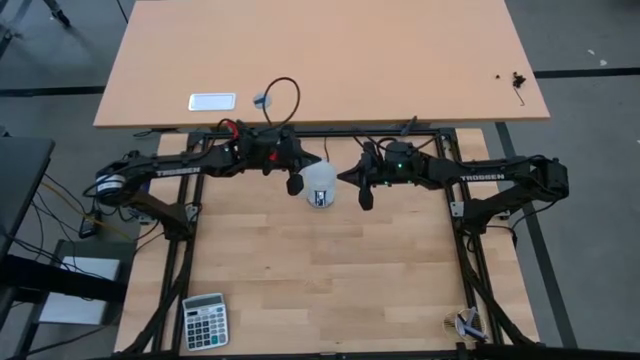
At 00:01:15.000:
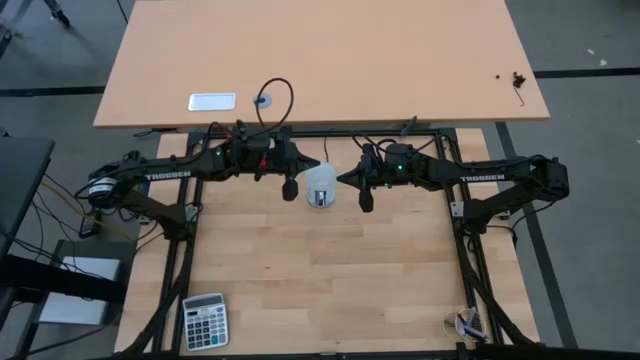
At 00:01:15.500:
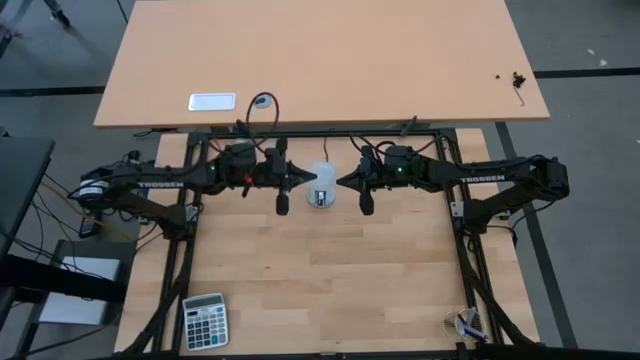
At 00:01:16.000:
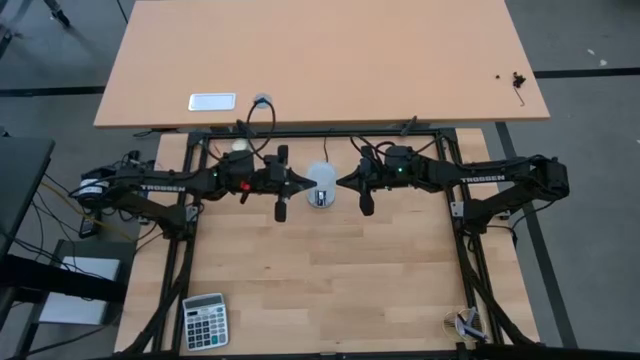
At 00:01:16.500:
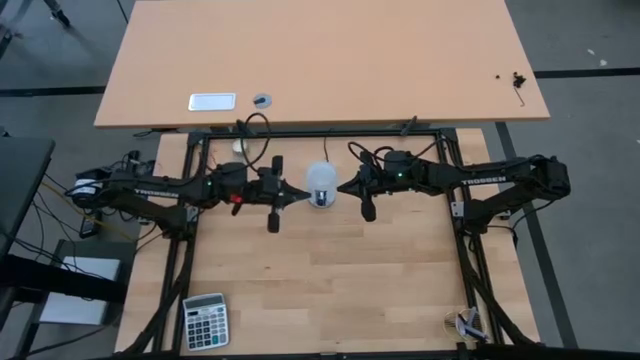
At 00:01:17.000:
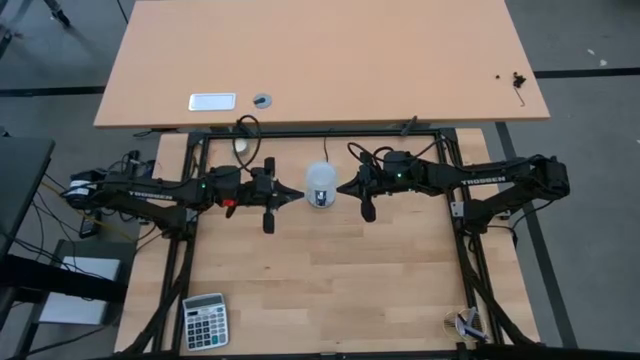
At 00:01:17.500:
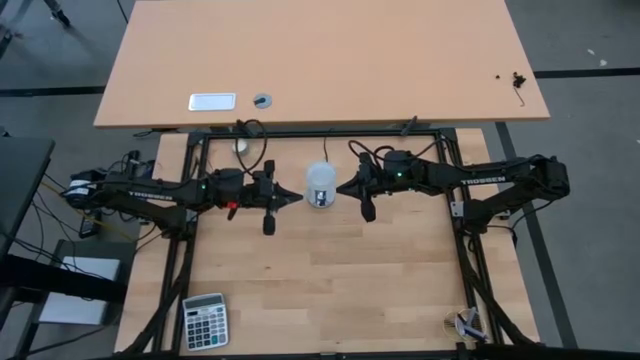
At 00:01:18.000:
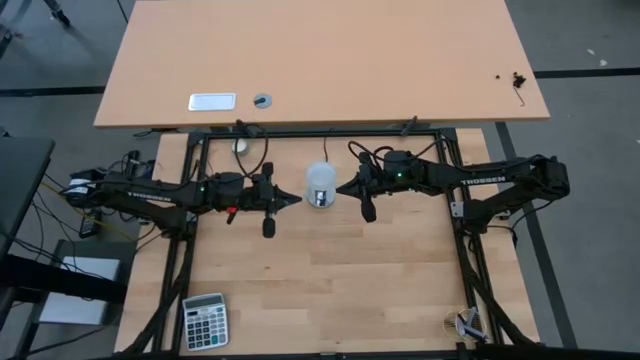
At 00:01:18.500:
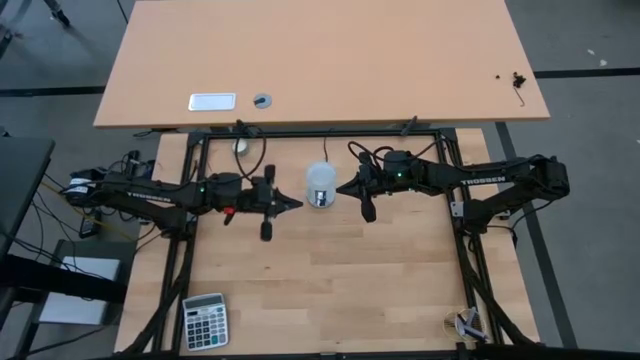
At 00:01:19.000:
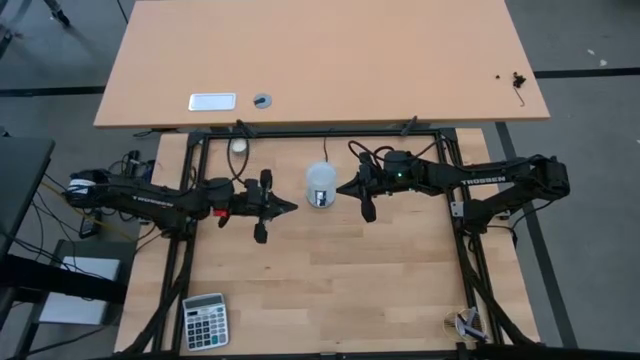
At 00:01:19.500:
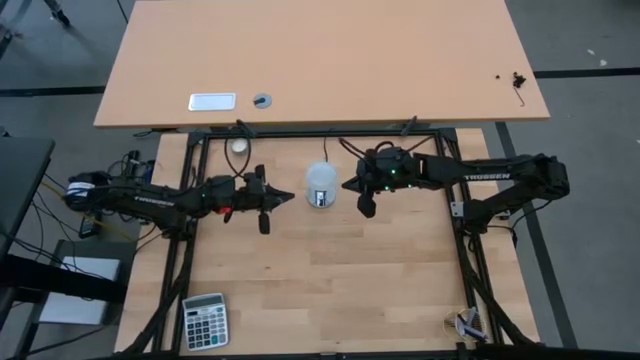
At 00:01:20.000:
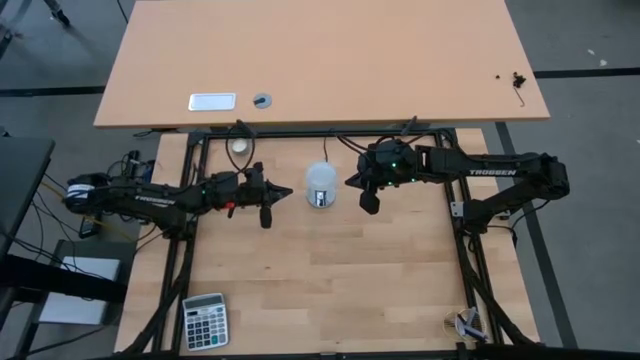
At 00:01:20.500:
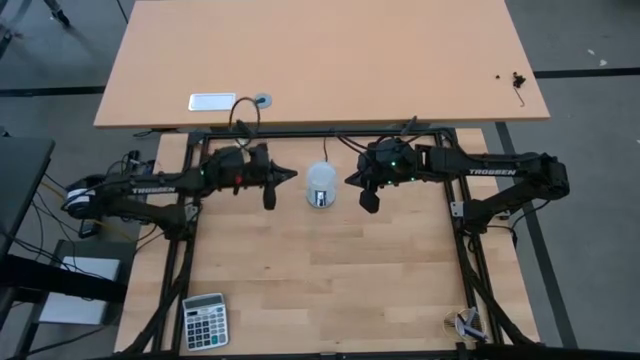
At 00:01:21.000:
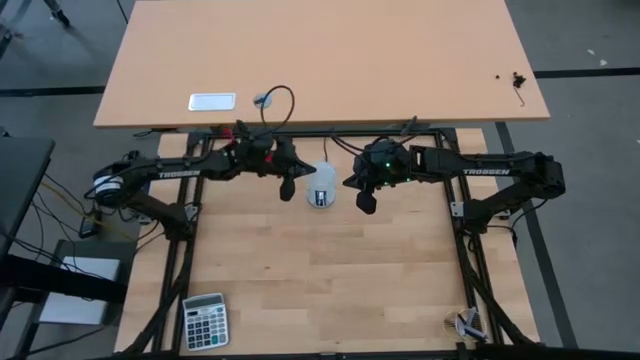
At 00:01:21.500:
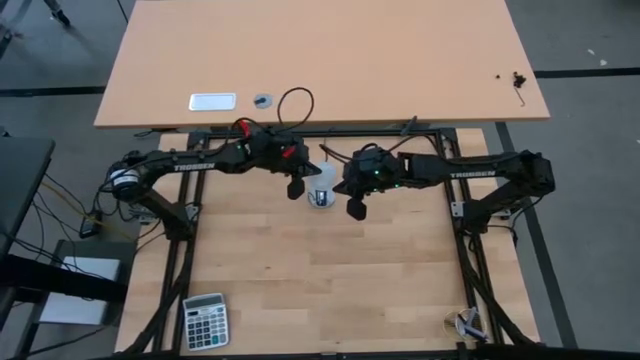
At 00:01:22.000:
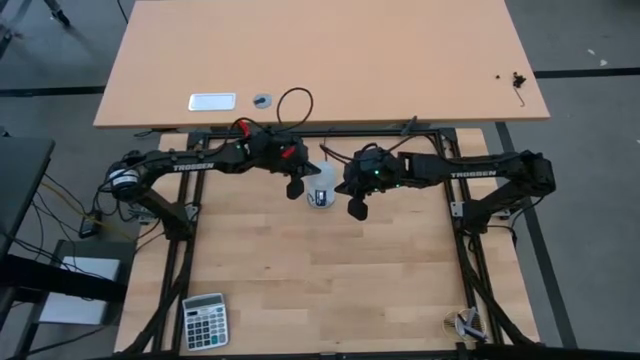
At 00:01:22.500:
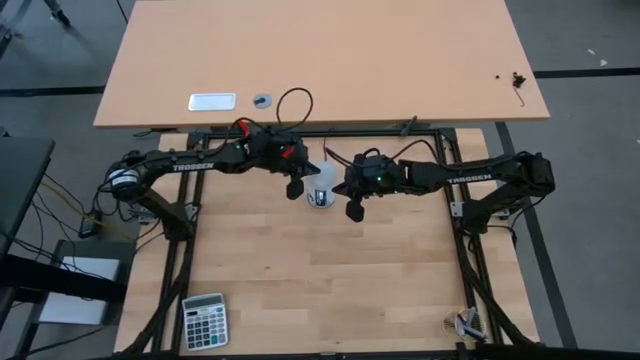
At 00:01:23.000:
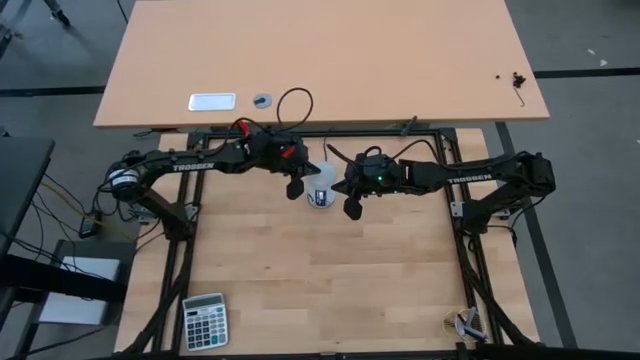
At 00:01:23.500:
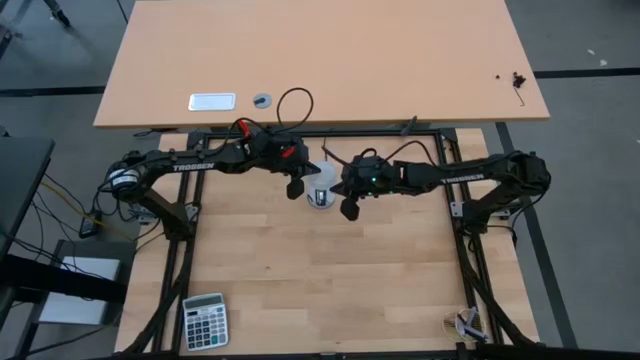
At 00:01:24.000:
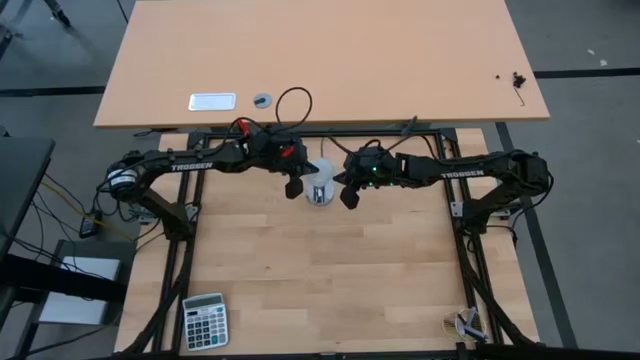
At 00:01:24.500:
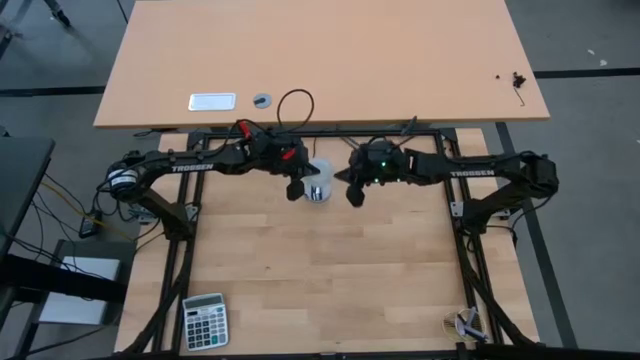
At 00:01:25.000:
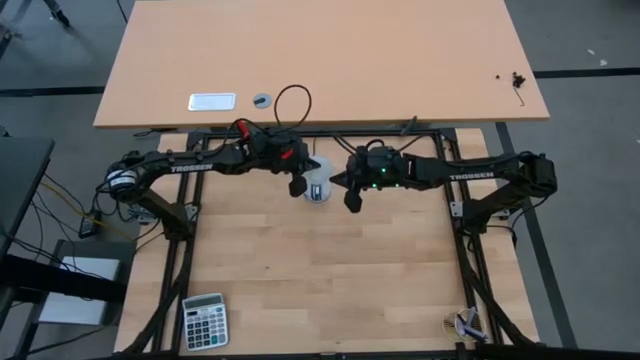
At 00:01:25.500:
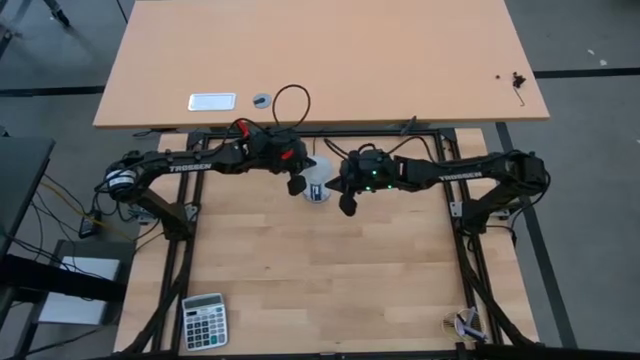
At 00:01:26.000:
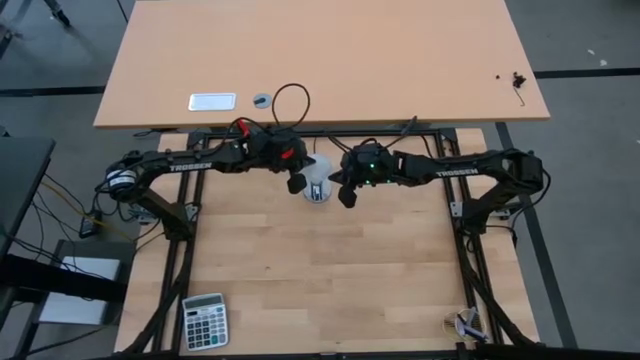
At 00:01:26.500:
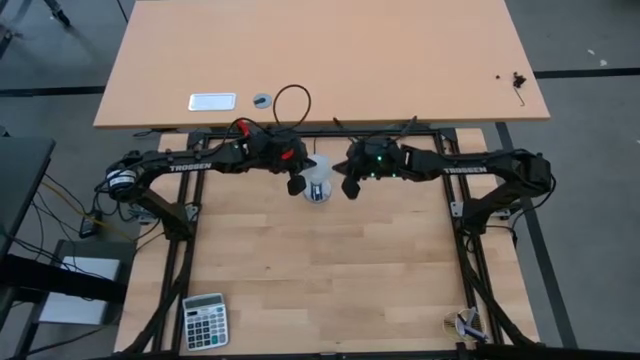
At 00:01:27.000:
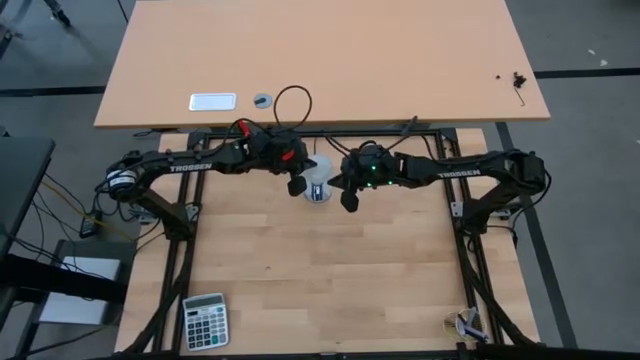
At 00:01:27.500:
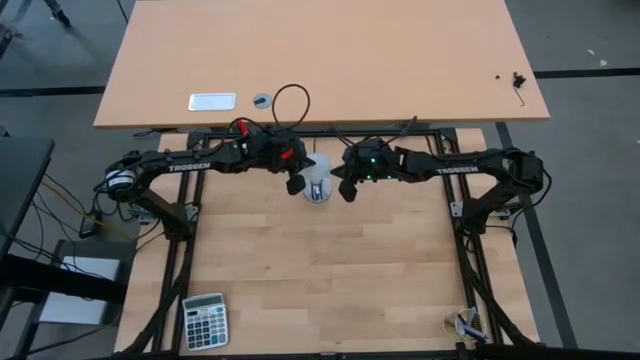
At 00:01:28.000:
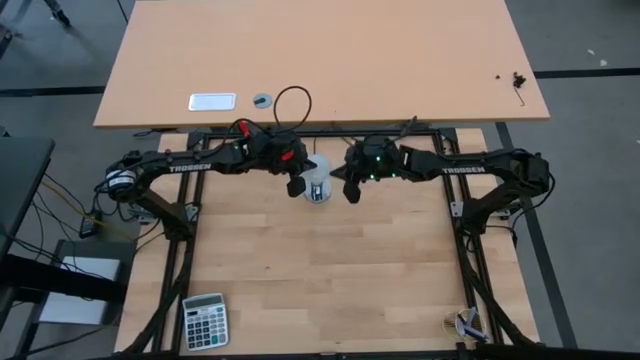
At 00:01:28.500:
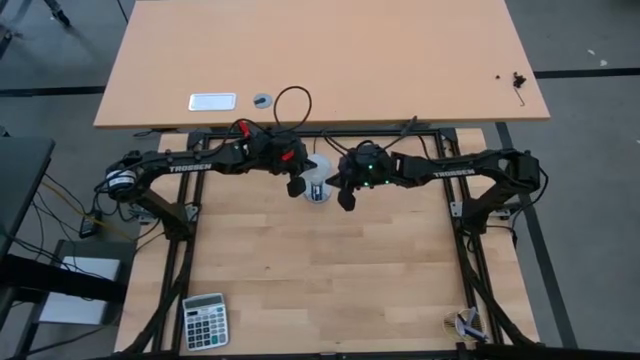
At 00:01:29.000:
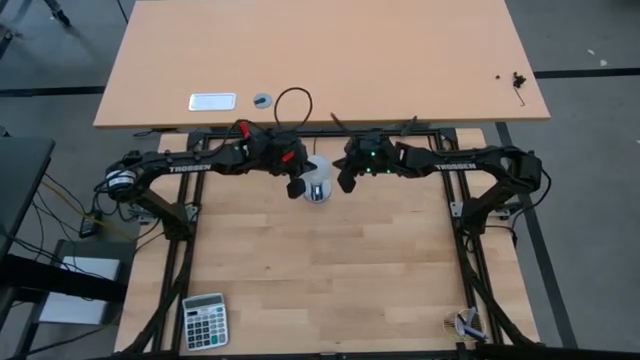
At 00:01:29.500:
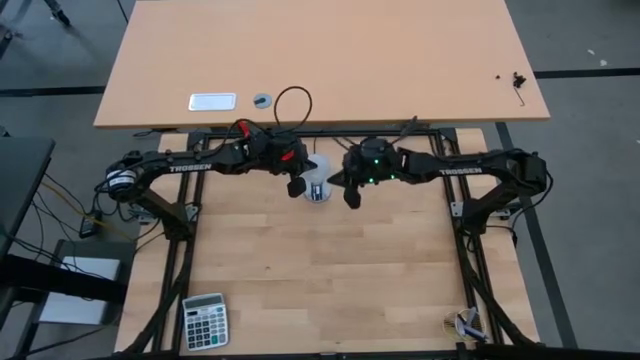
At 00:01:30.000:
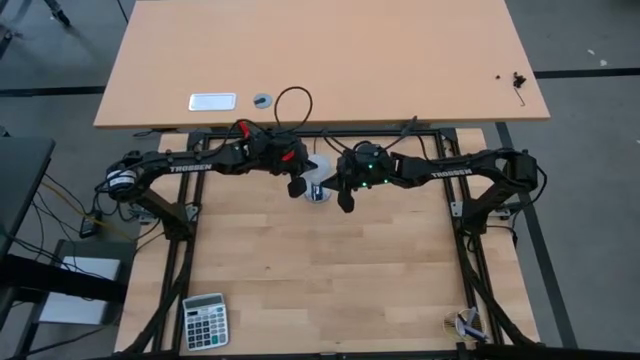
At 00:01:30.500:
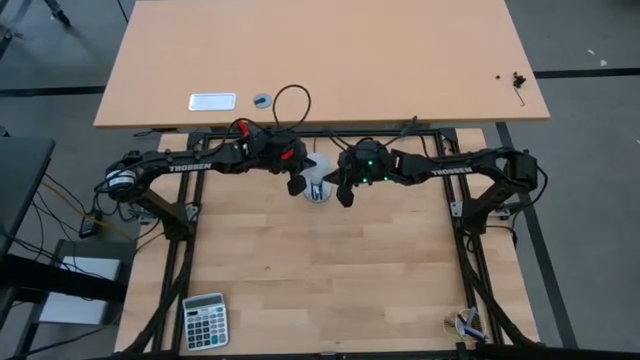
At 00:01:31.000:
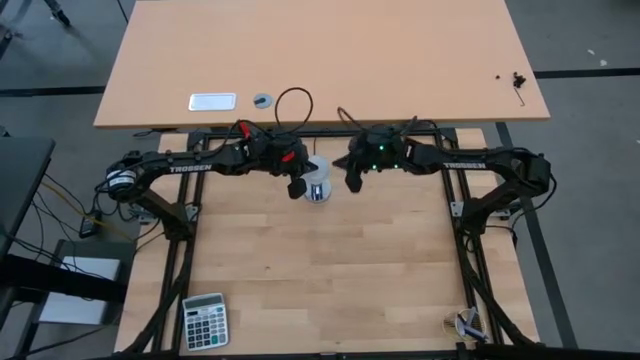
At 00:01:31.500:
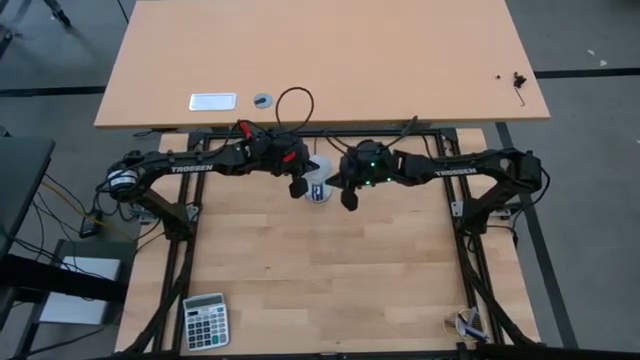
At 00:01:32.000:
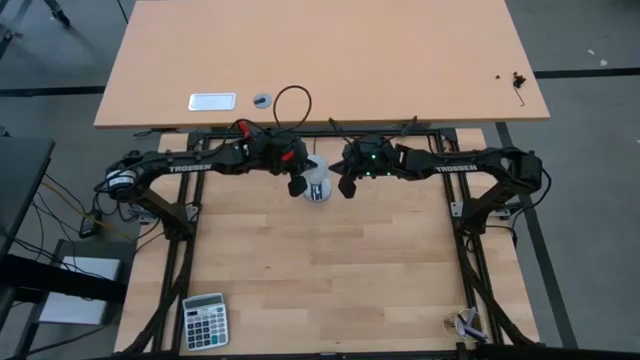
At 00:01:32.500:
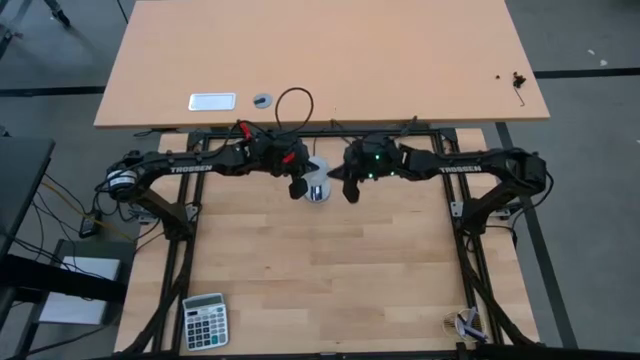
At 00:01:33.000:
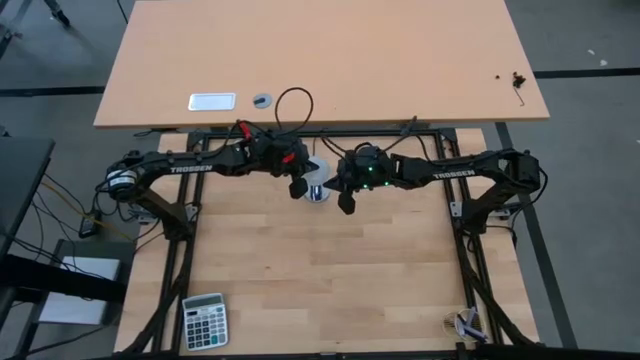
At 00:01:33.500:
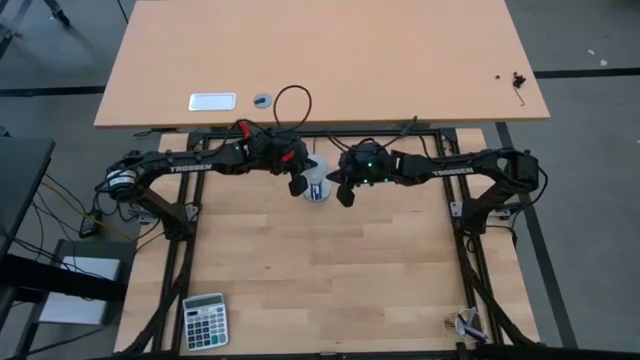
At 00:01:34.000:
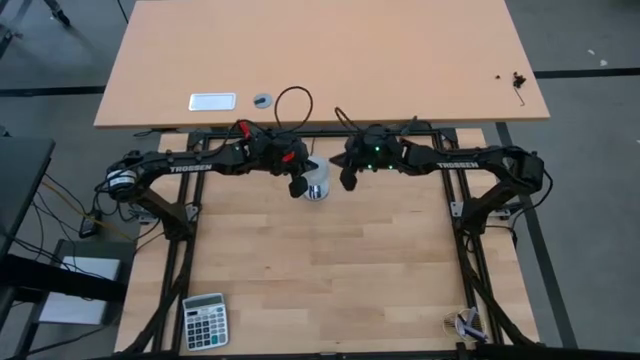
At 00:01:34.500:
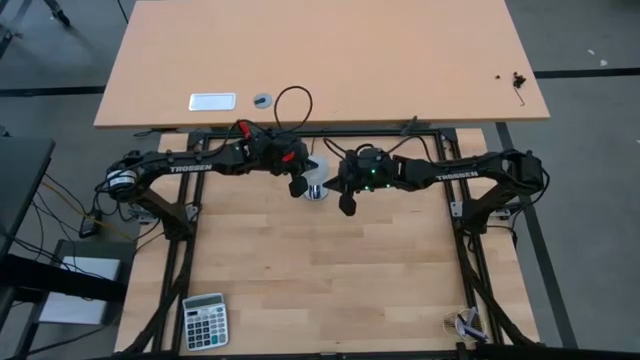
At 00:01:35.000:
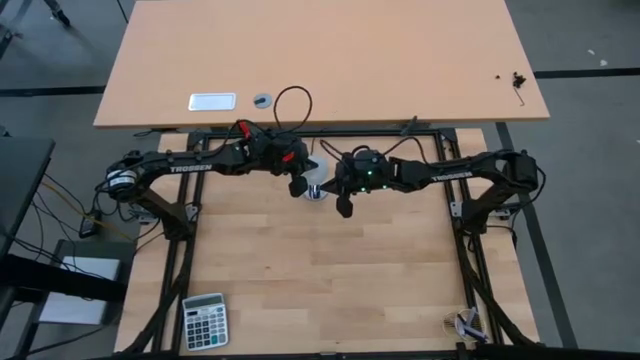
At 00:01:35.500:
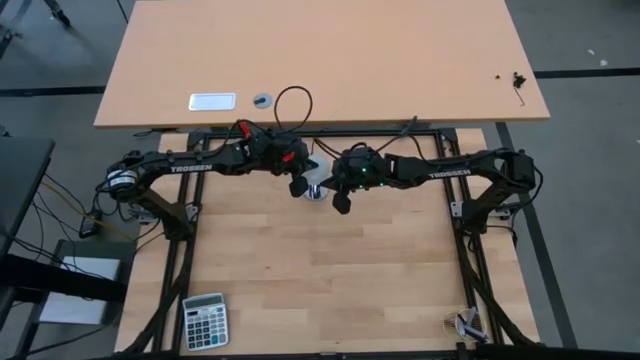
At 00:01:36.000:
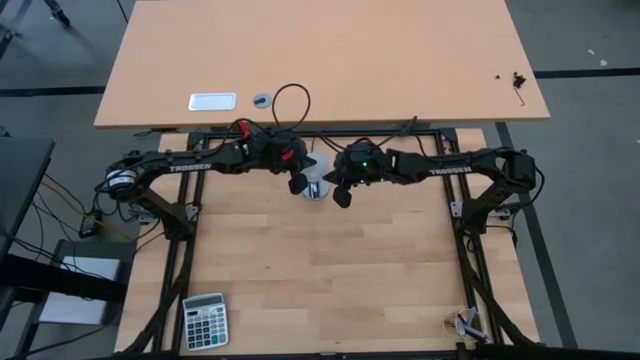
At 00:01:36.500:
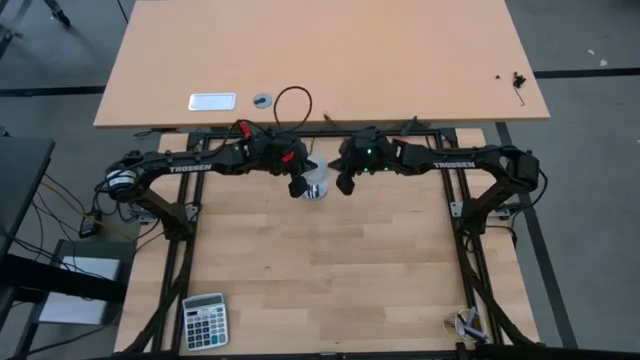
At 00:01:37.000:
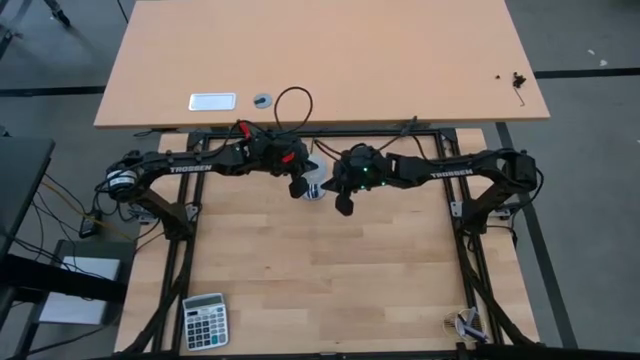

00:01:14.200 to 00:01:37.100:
Task: Screw lightbulb
Remove the lightbulb from the lamp
